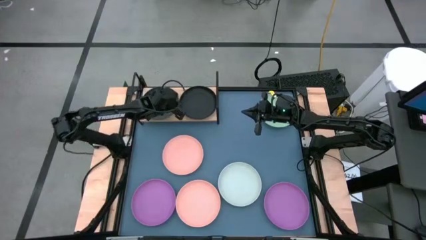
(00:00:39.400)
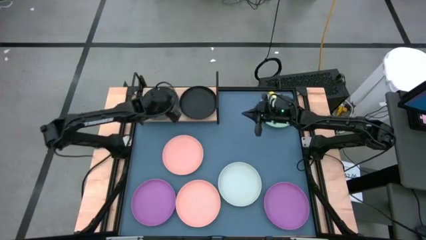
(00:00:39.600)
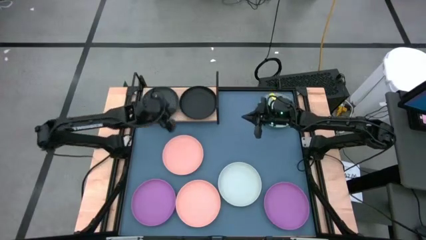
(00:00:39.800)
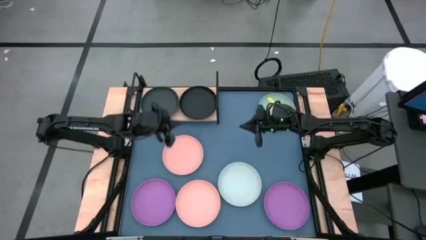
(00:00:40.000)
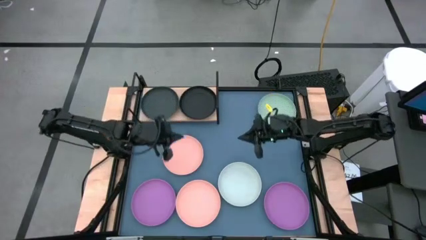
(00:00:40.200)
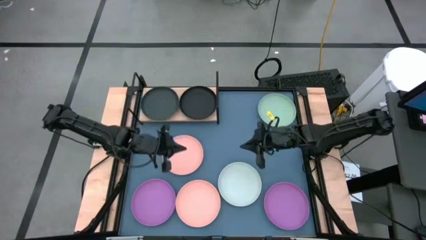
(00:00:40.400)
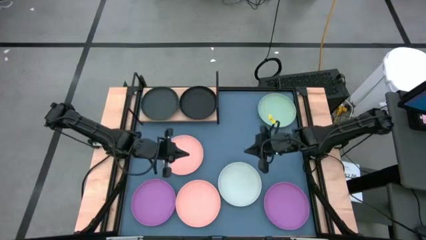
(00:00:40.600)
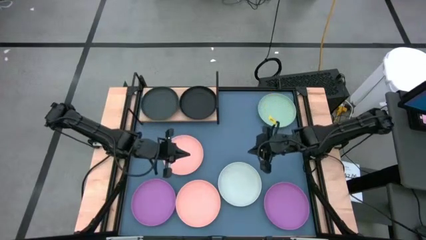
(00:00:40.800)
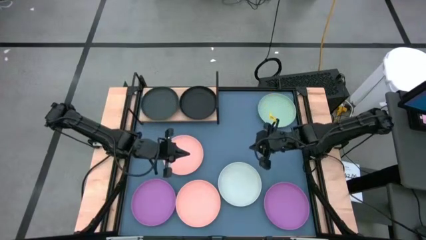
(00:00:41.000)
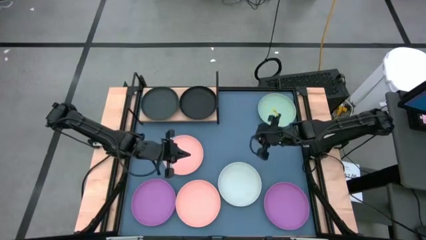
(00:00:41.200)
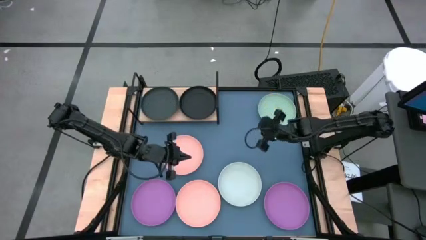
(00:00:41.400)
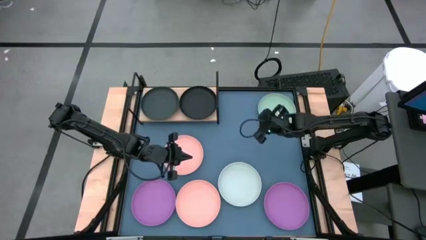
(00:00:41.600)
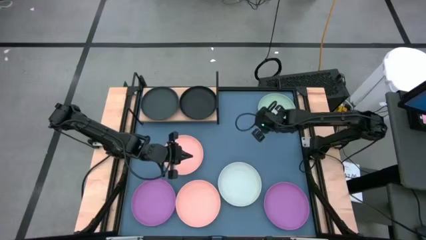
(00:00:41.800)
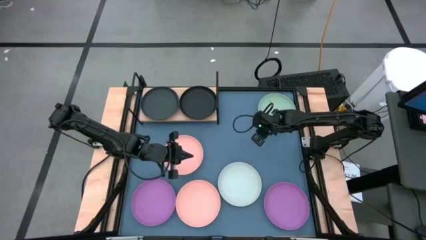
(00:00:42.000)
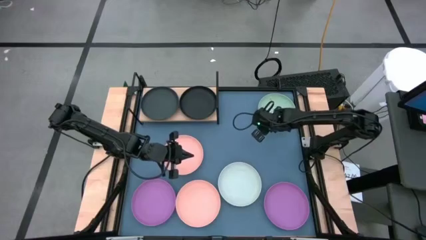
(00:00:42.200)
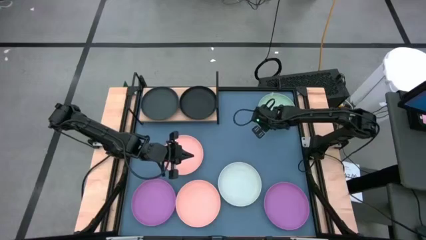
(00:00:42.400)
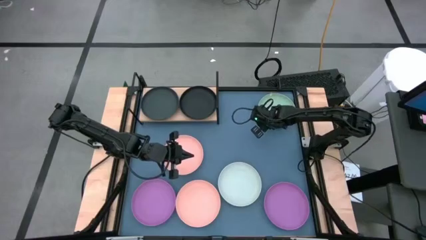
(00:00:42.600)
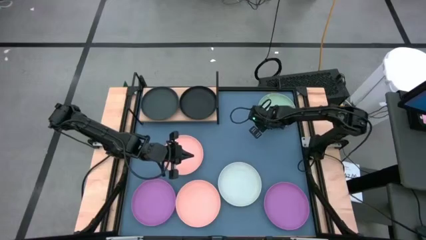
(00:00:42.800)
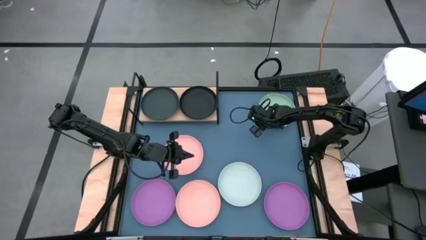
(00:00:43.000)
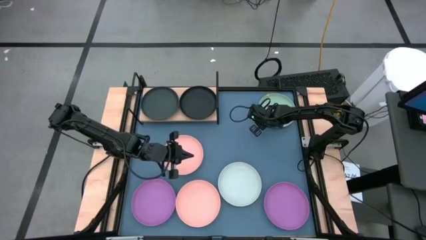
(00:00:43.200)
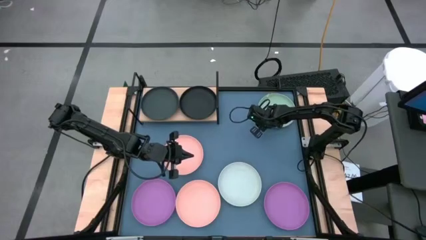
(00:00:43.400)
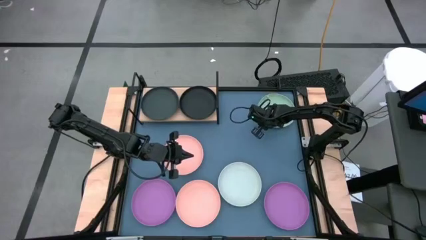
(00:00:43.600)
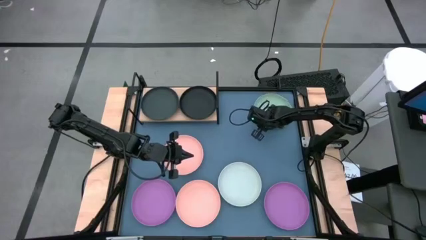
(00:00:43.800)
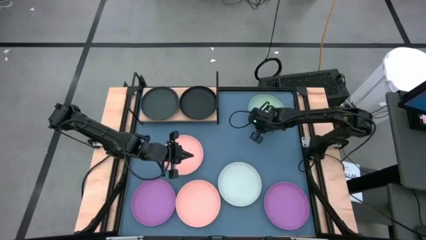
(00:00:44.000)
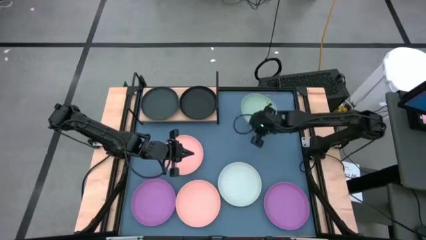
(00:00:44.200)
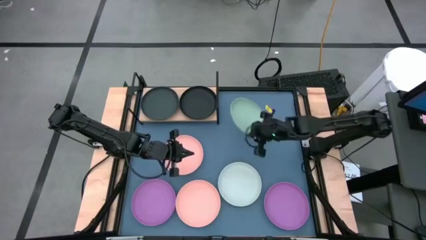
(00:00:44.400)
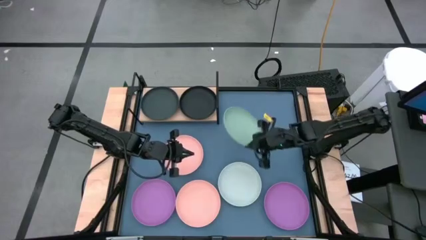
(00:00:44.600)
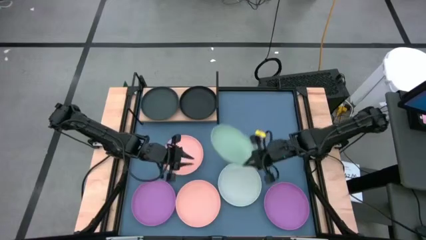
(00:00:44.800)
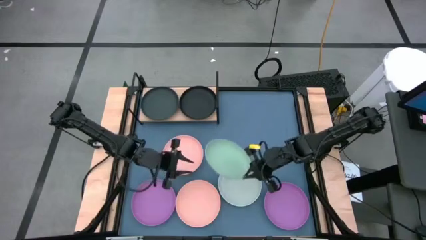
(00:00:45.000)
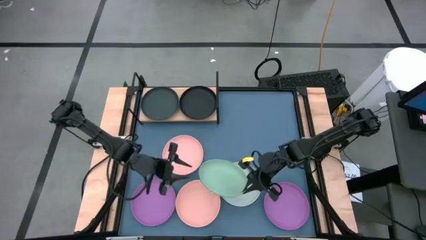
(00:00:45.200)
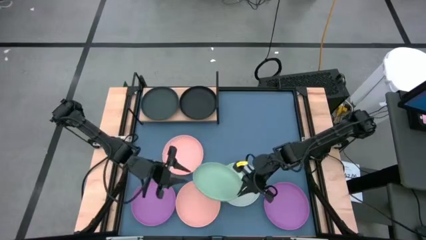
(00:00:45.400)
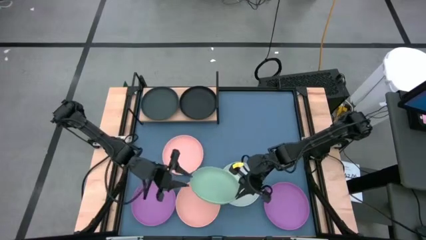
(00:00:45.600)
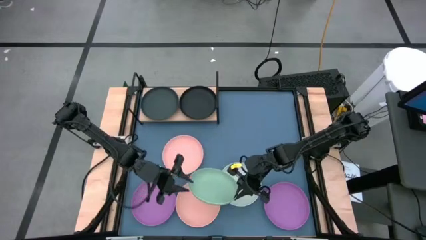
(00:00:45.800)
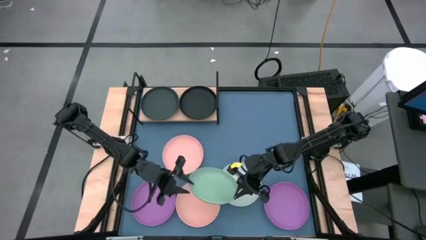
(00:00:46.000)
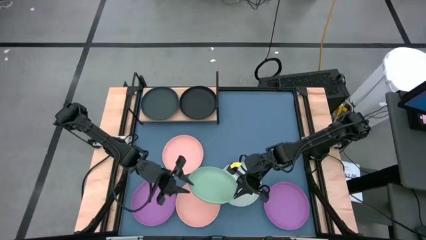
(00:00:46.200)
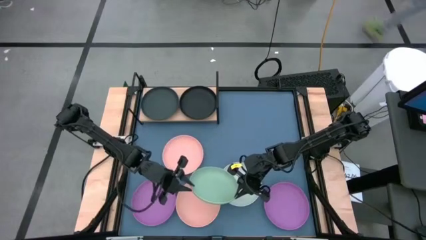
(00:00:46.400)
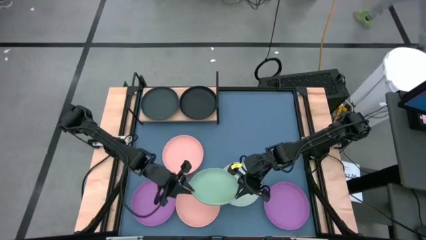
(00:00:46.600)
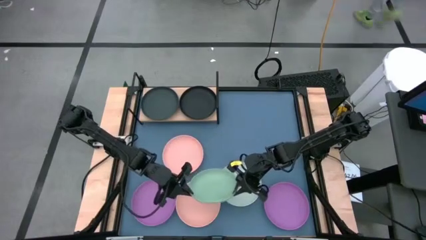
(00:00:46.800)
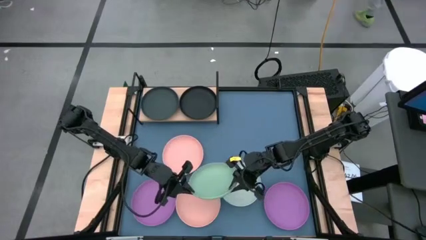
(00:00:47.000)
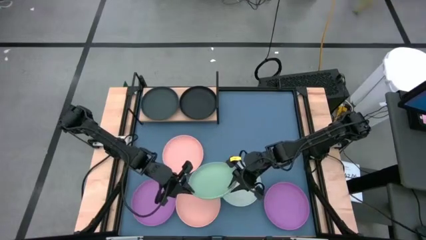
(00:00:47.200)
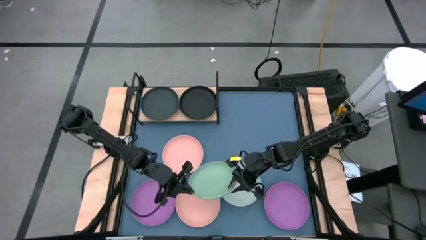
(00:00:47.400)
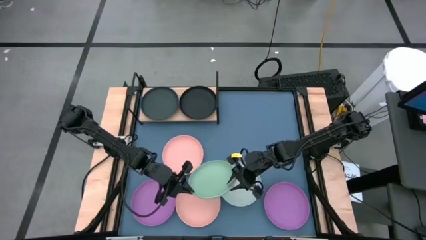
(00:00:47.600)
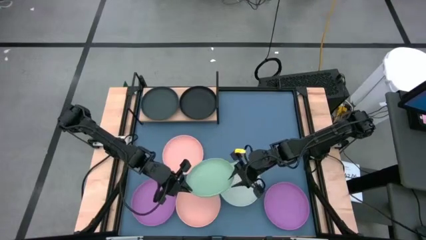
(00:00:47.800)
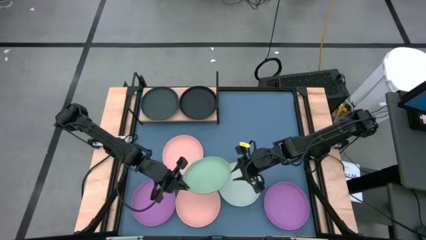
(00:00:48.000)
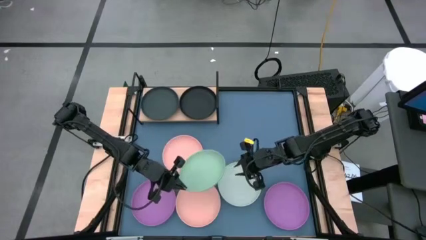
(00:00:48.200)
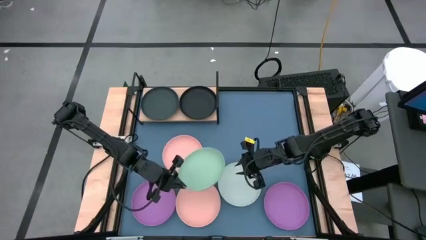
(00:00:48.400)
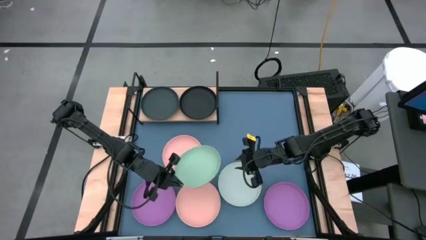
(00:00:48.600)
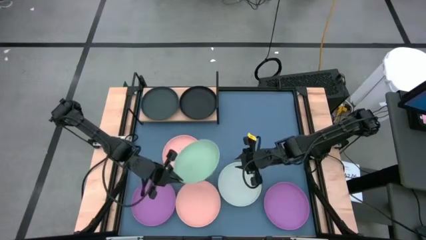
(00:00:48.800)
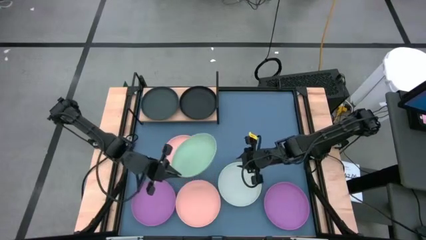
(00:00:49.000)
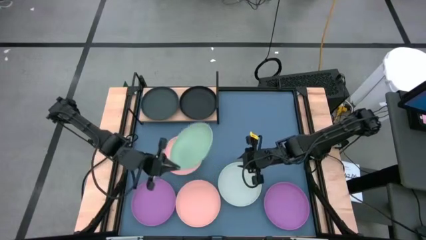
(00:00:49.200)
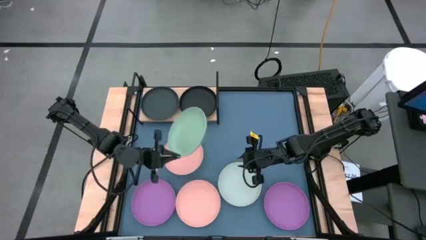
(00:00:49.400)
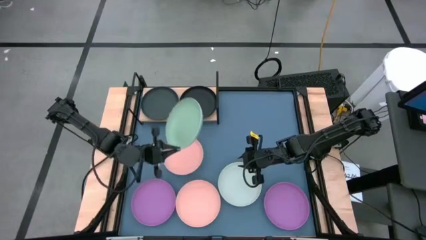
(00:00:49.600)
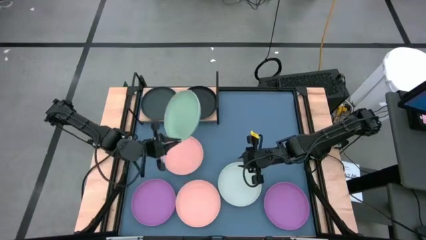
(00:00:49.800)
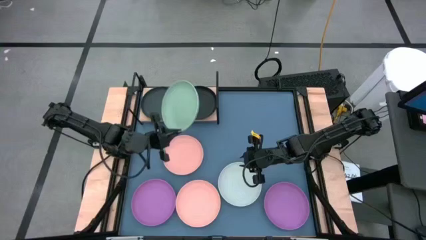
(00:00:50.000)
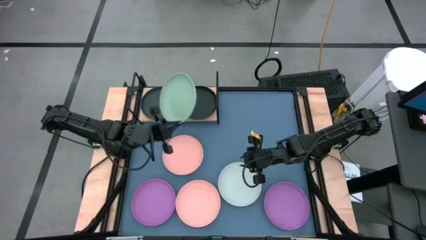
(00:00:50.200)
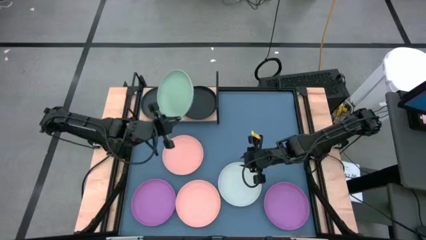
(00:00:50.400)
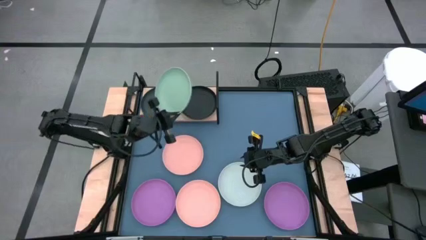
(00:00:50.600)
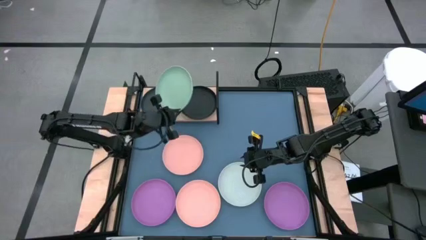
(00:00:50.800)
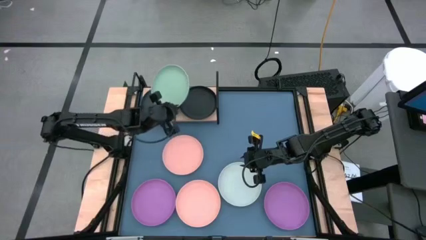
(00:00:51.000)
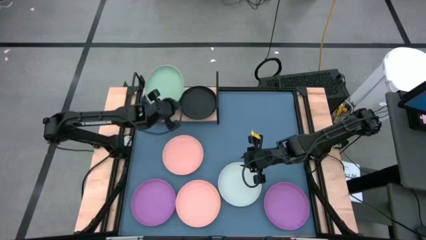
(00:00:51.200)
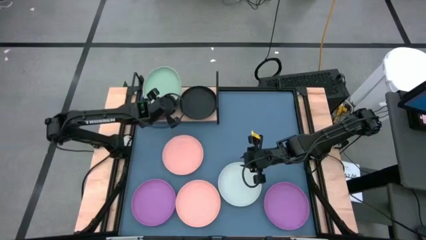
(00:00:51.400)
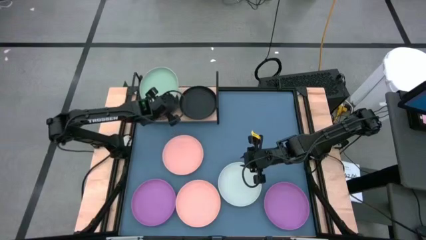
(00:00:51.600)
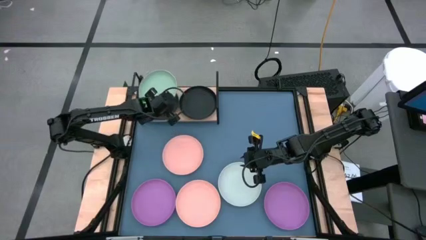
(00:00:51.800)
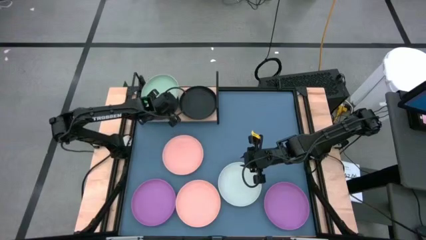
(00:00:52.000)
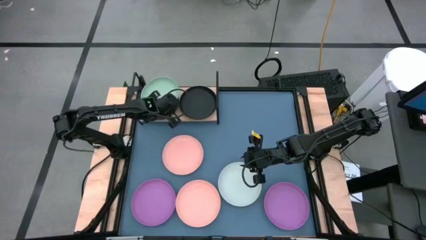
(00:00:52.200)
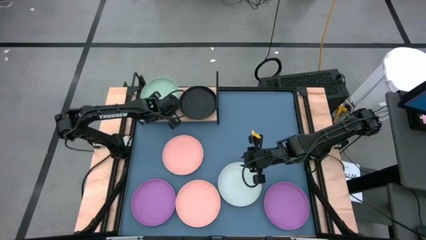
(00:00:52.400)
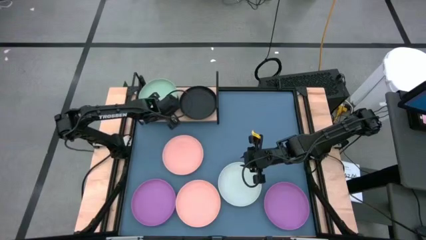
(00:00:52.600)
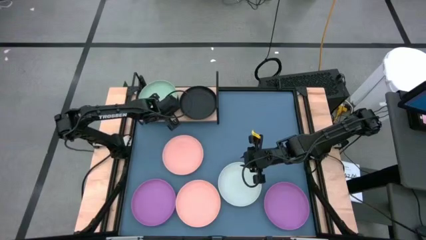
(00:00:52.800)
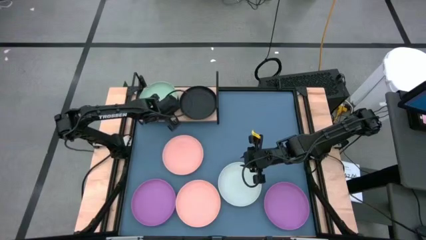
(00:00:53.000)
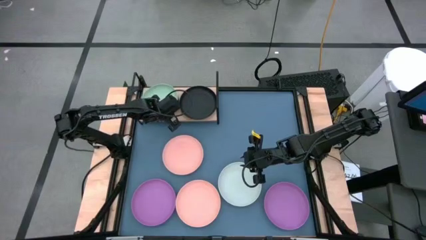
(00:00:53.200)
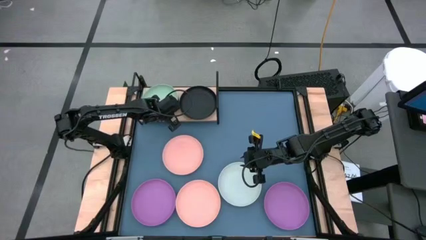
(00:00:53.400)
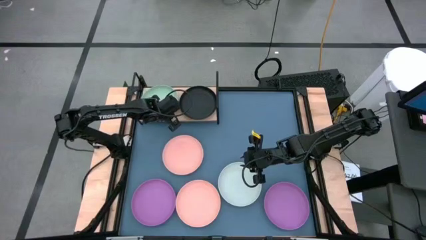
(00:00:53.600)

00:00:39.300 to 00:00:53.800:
Task: Place and stack plates onto a shelf
Stack the light green plate on top of the left black plate on the shelf
